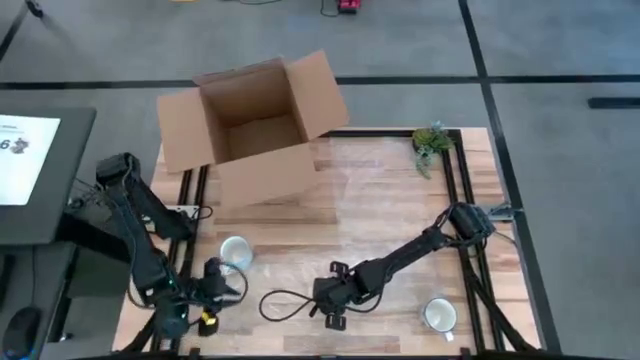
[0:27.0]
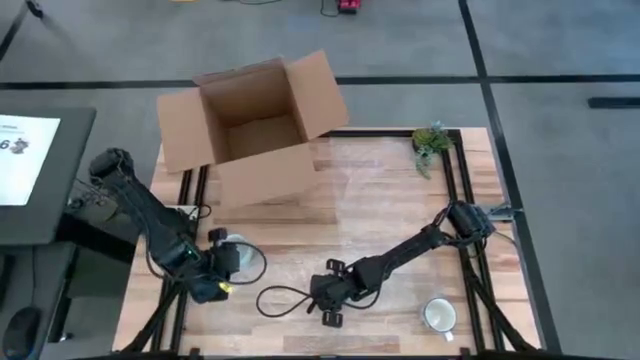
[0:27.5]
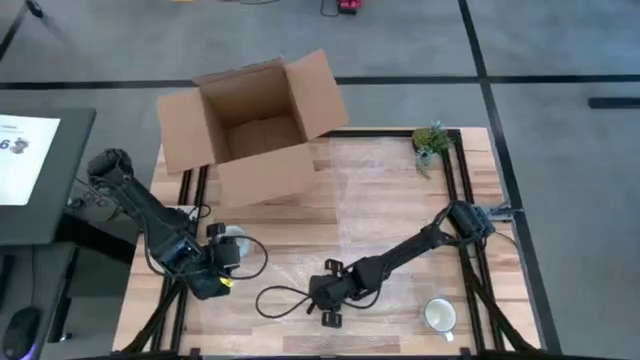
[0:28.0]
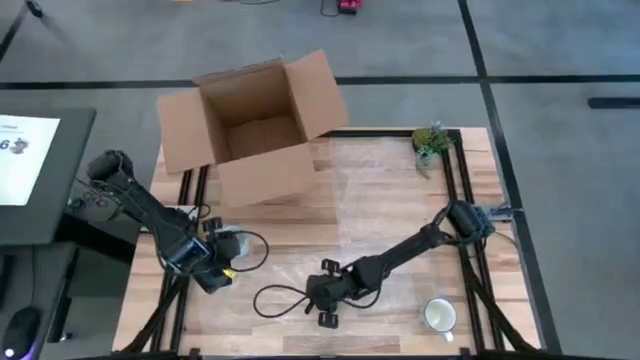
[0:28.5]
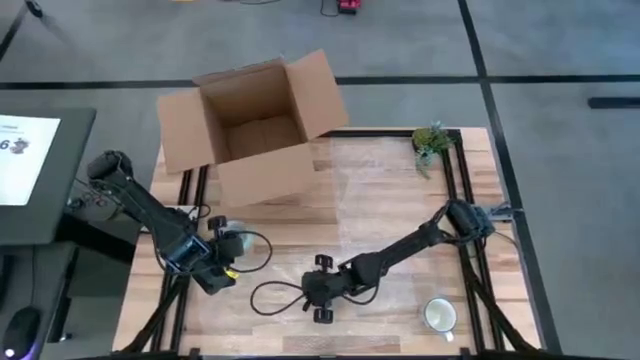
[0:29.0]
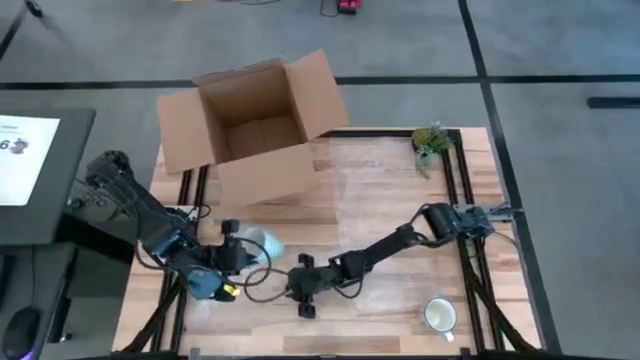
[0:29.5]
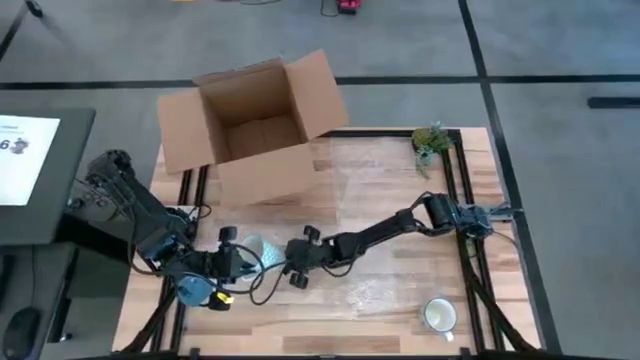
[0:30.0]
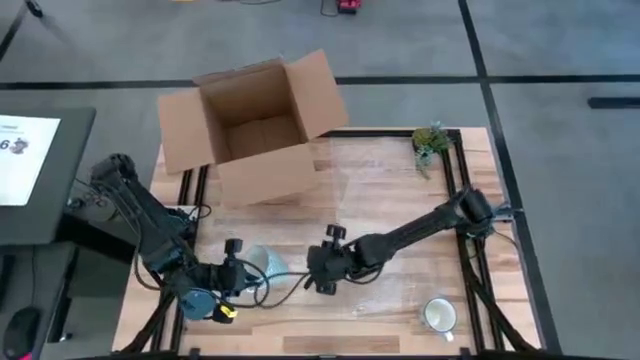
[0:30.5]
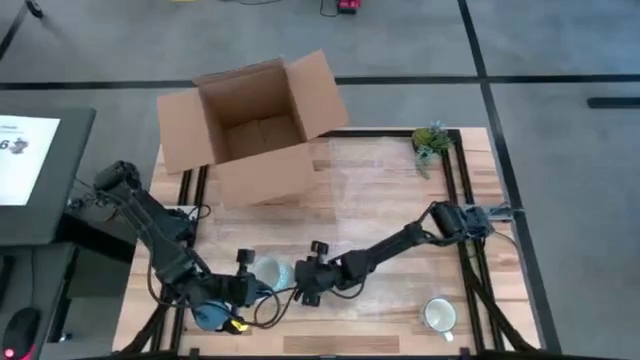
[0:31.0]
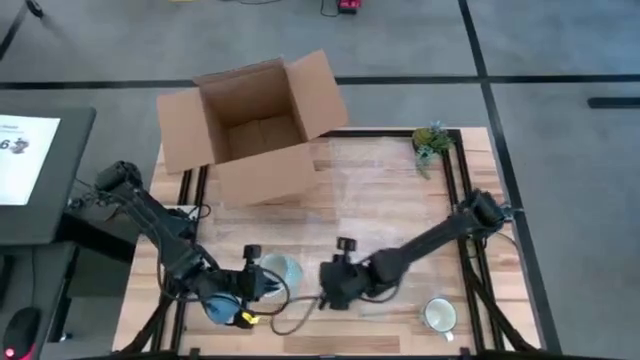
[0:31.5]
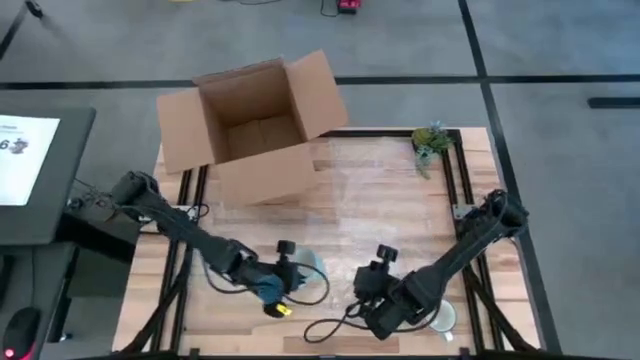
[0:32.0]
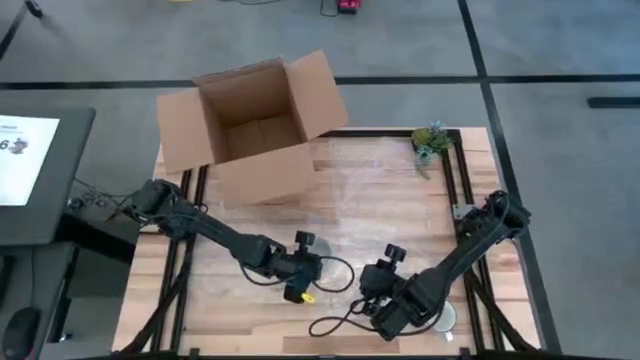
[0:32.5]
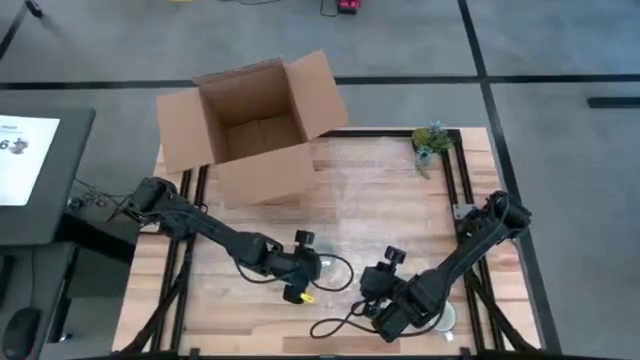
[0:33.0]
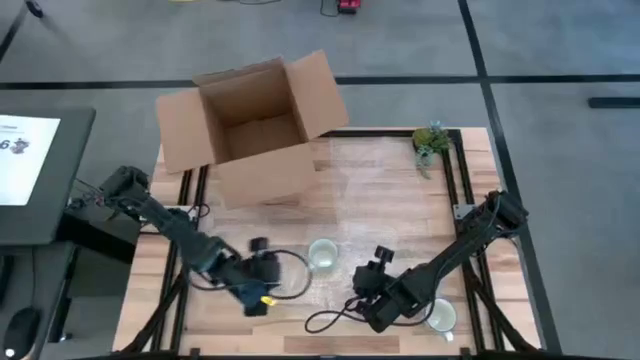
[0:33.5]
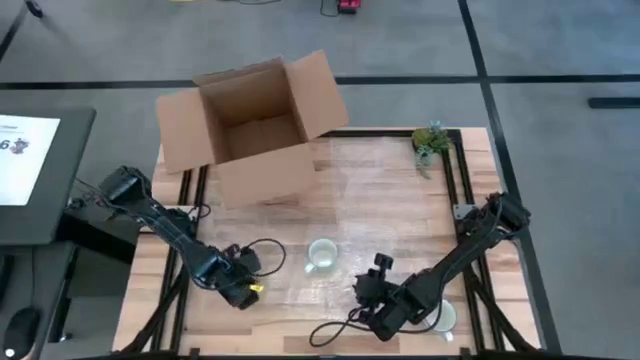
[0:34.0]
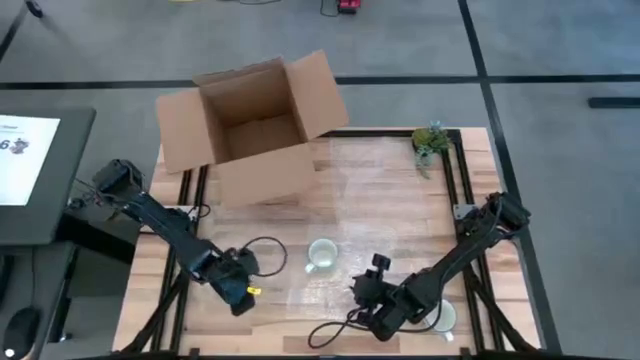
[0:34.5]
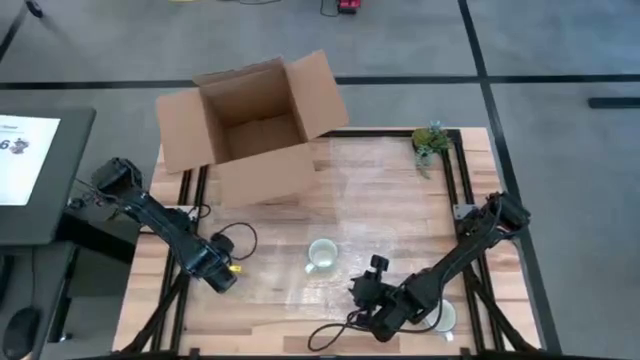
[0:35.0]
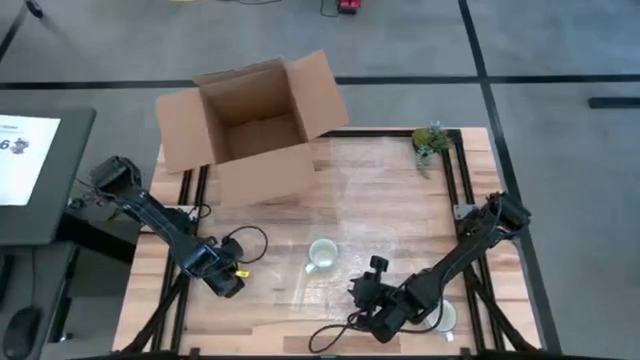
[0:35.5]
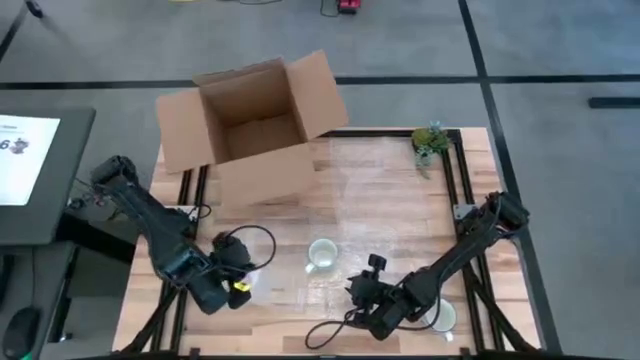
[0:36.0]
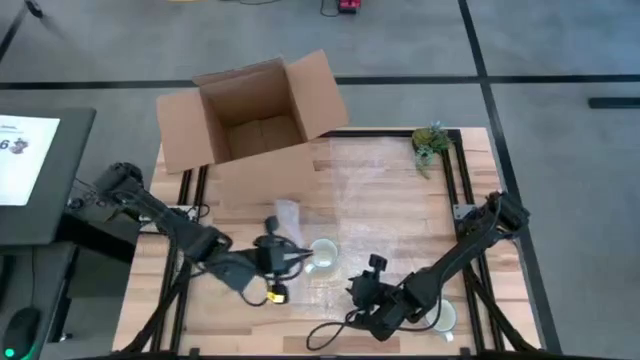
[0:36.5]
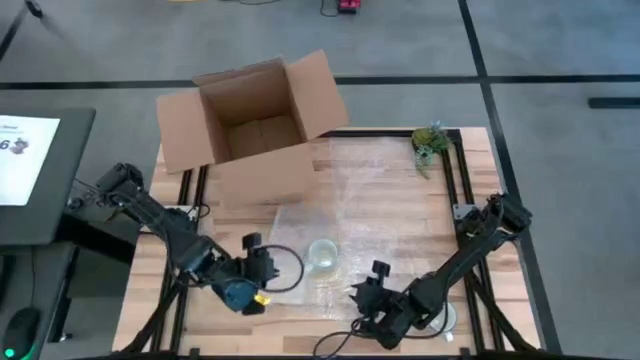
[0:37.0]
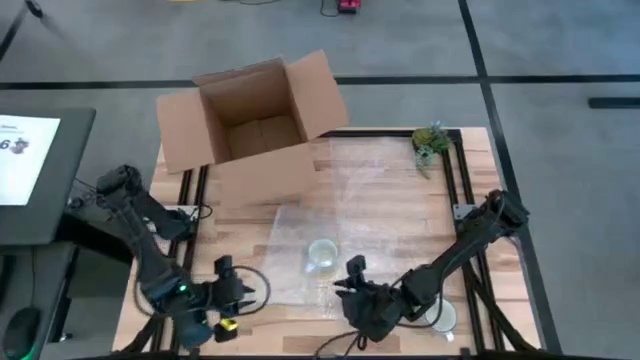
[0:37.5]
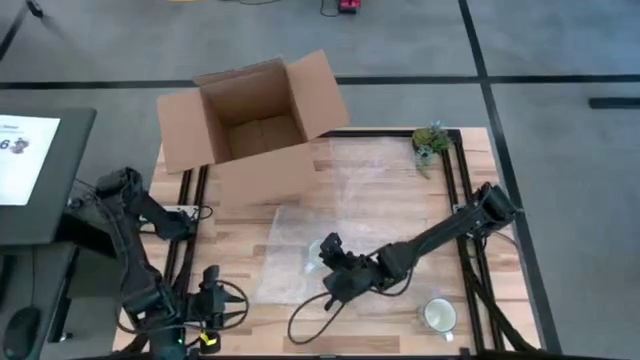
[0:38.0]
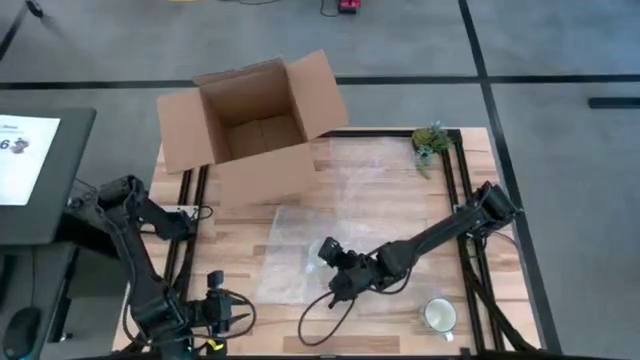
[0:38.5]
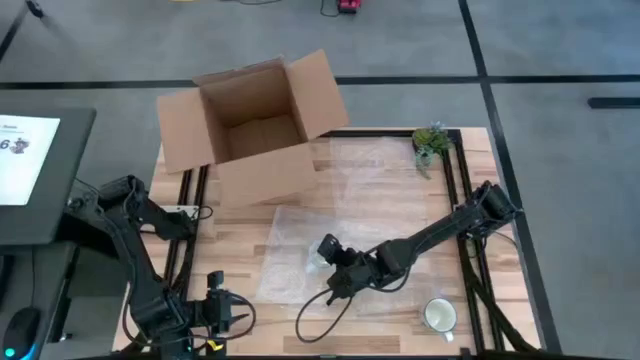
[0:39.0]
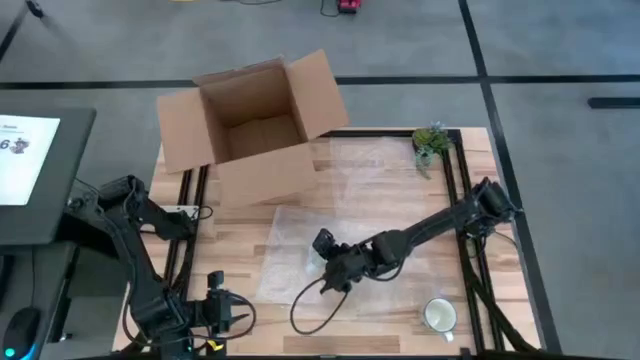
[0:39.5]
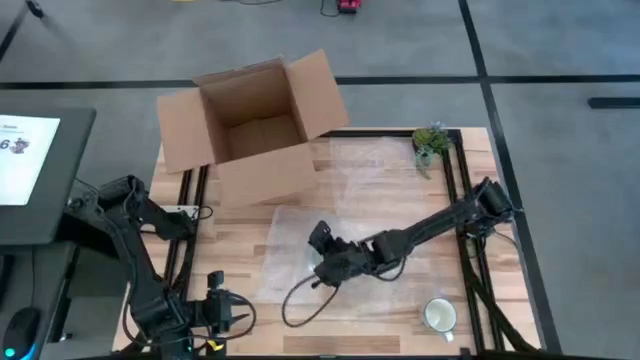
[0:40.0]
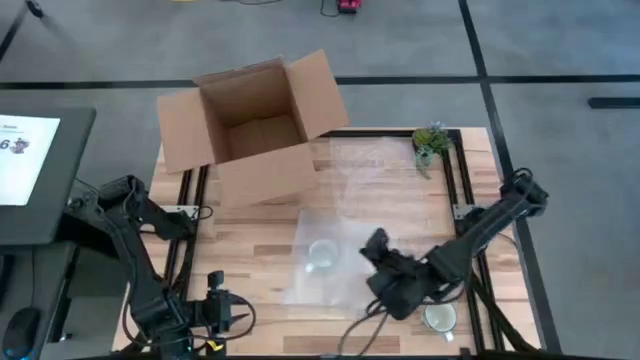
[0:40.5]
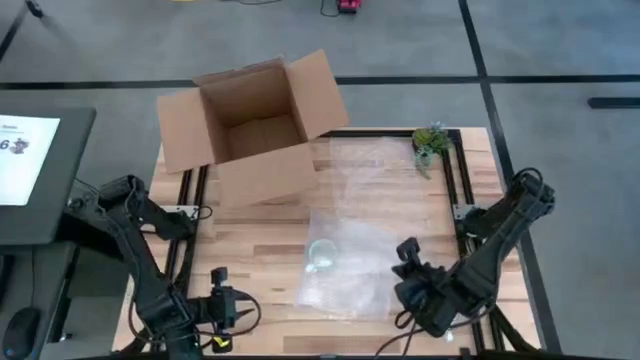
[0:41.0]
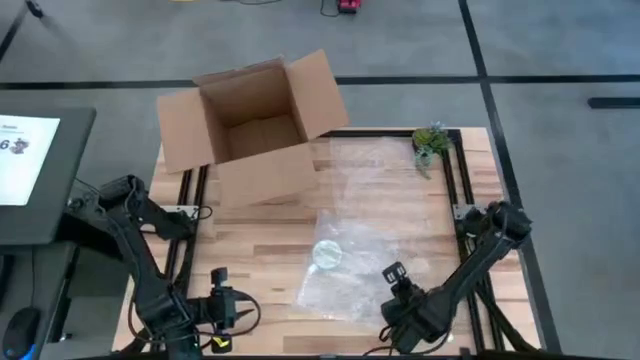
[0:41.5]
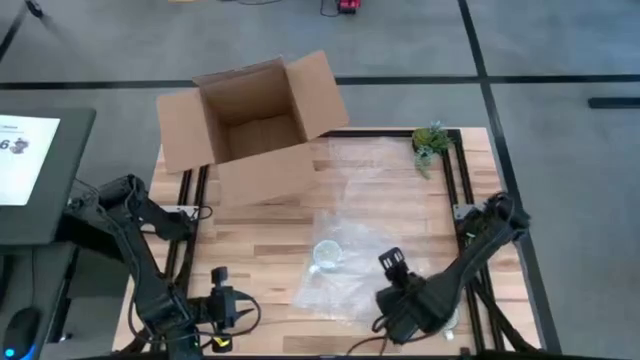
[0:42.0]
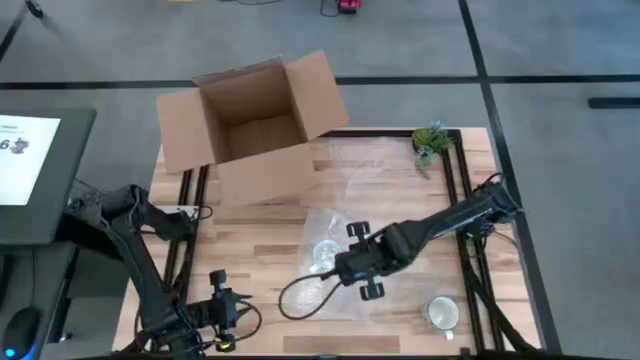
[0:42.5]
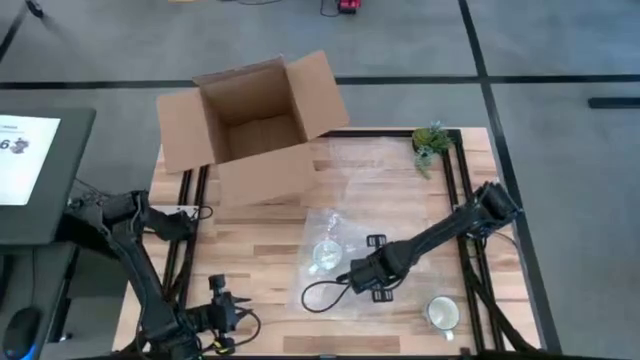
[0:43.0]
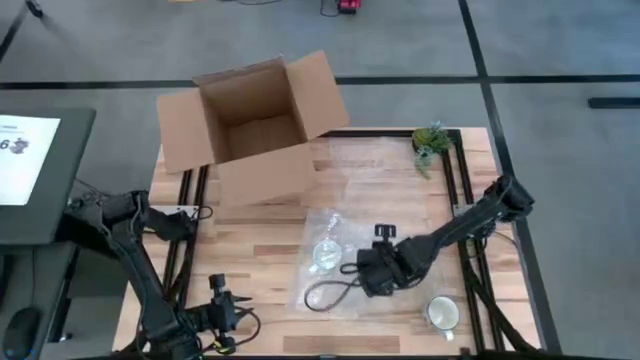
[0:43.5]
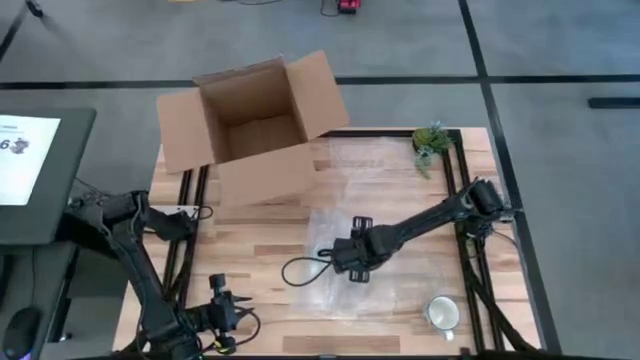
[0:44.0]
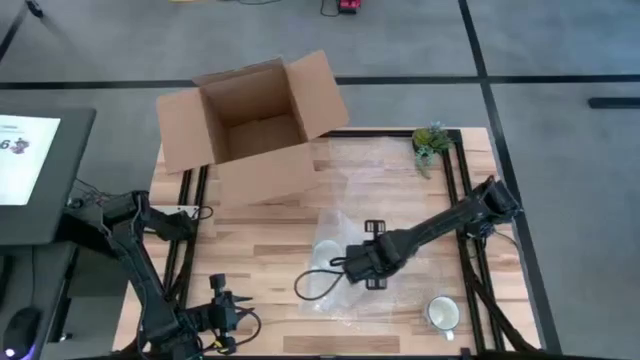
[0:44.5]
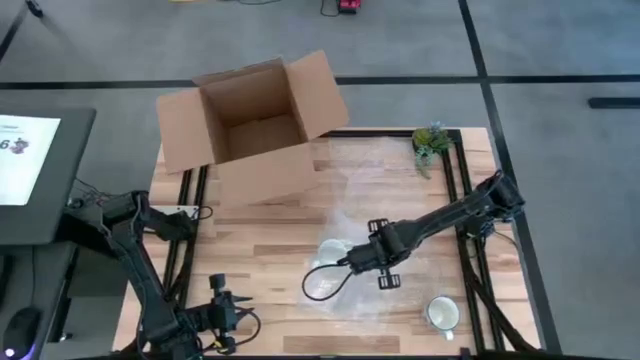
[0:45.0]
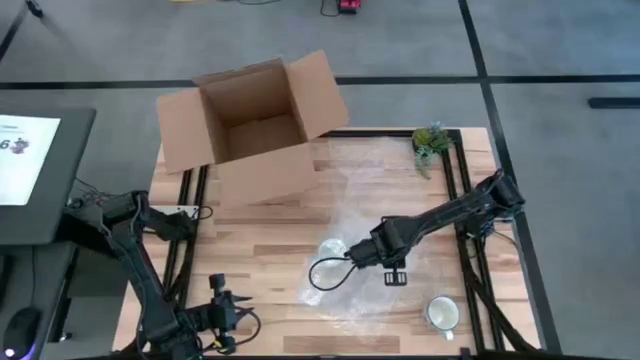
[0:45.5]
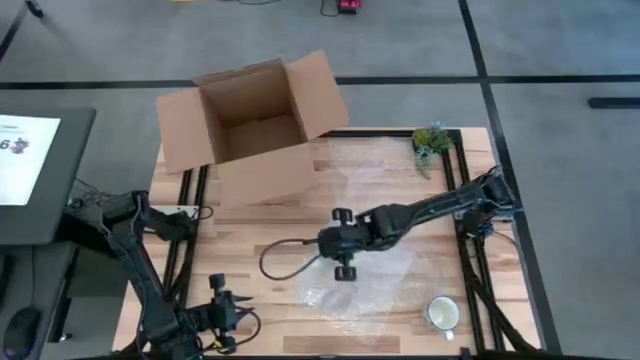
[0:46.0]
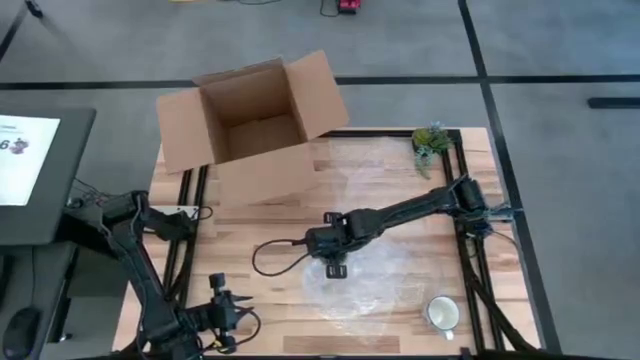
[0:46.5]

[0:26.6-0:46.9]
Task: wrap mug
Wrap the green patterned mug with the bubble wrap
